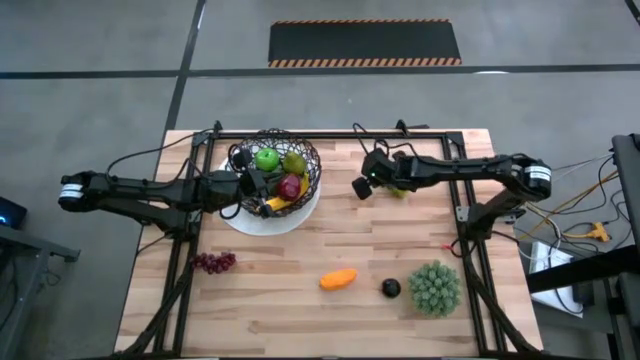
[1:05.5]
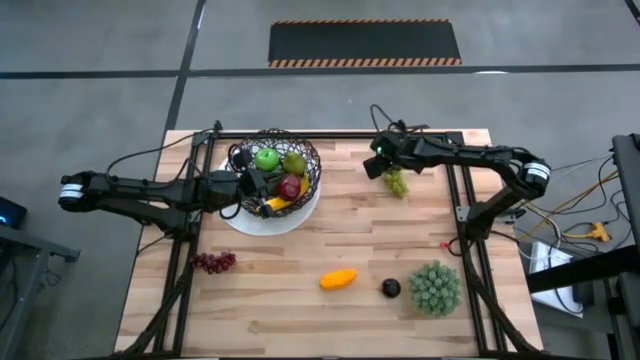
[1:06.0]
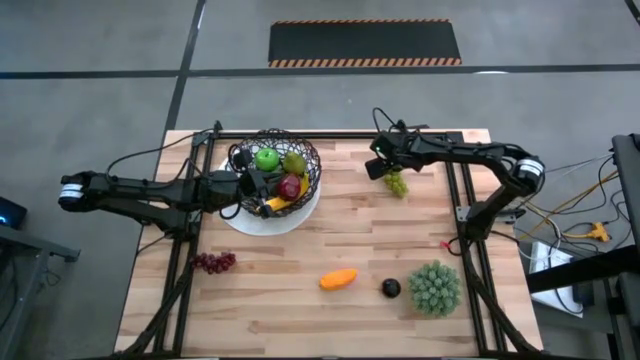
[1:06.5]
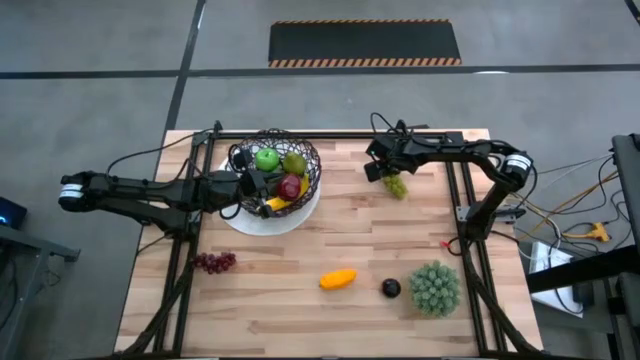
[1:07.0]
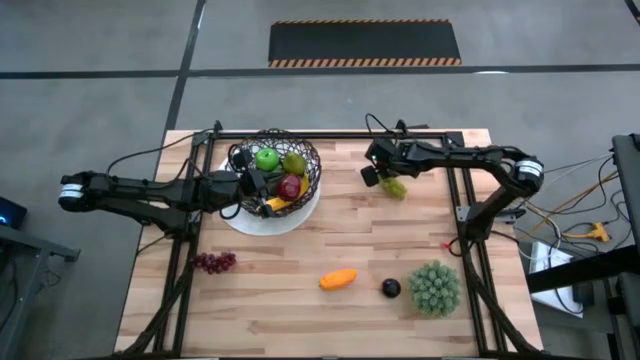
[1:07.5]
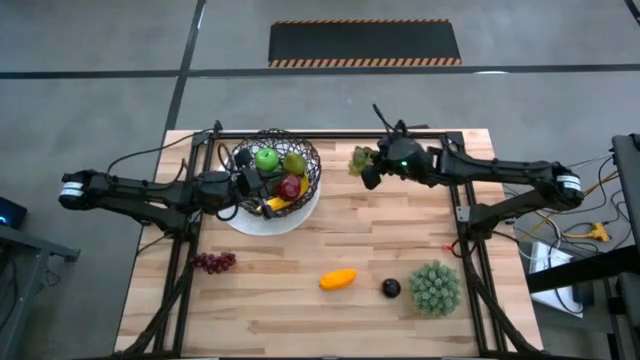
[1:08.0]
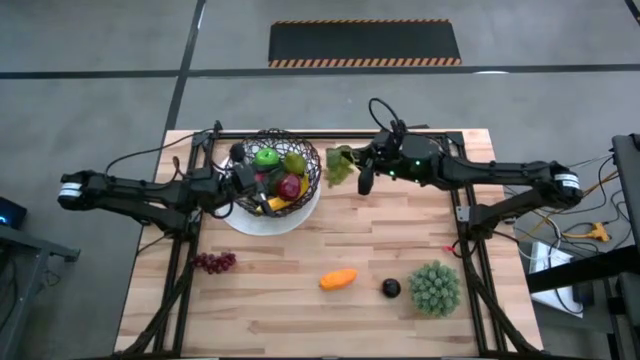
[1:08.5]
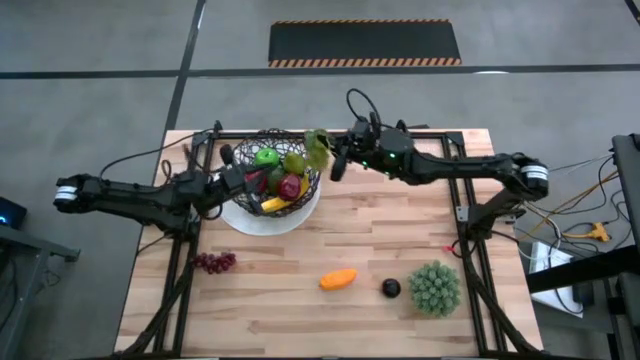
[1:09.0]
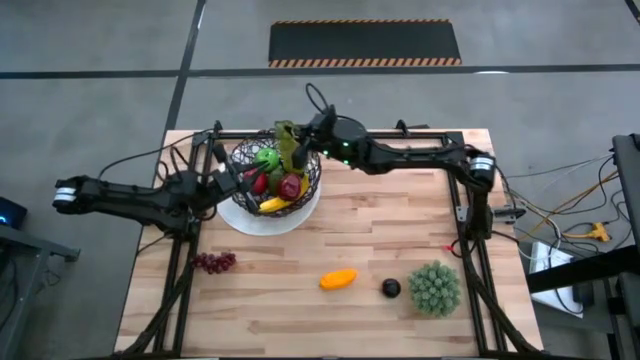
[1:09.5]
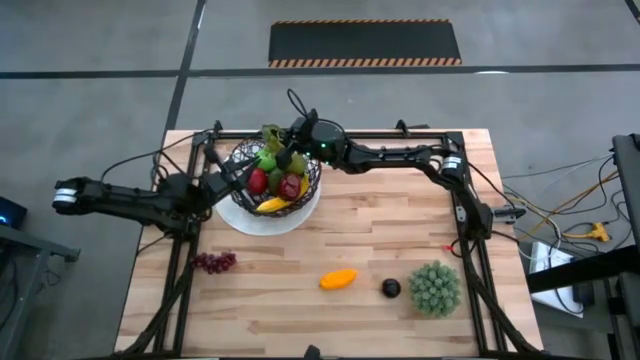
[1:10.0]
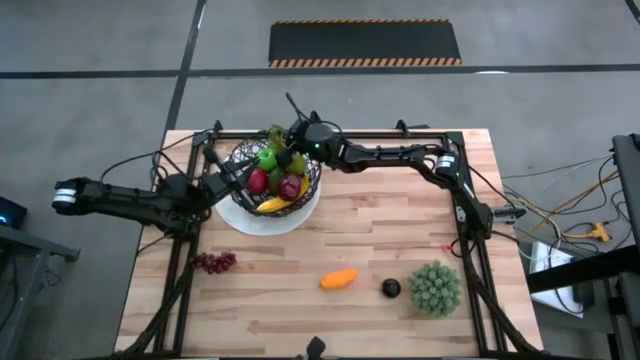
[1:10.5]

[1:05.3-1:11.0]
Task: Build produce basket
Put the green grapes into the woven basket

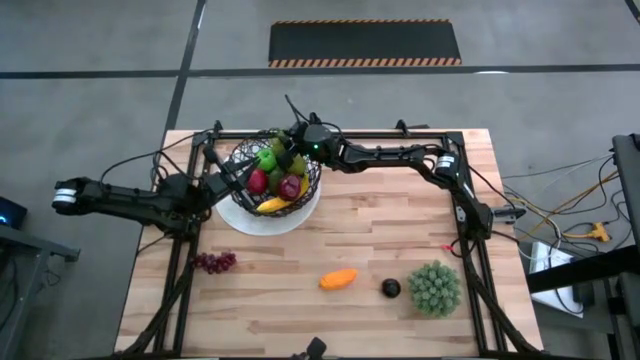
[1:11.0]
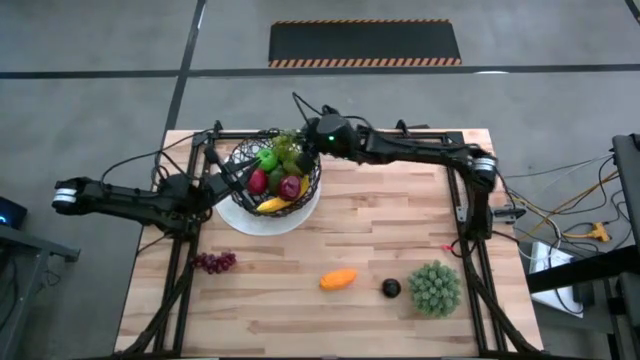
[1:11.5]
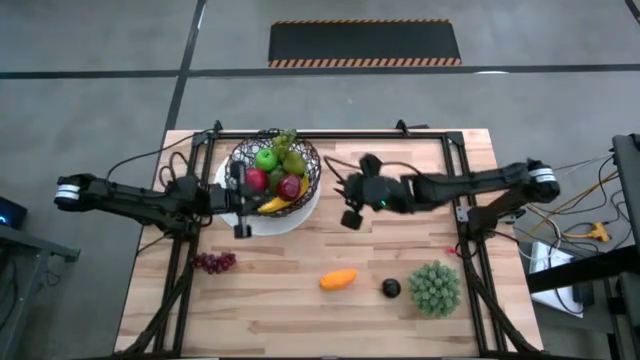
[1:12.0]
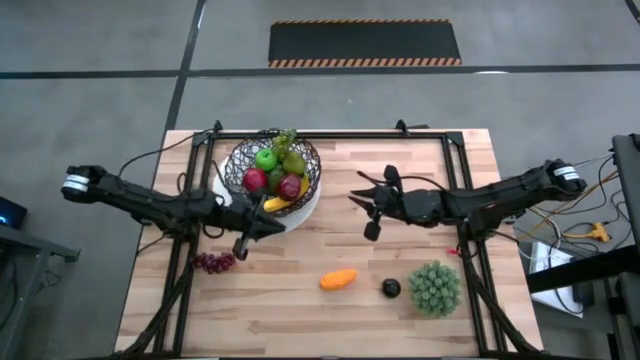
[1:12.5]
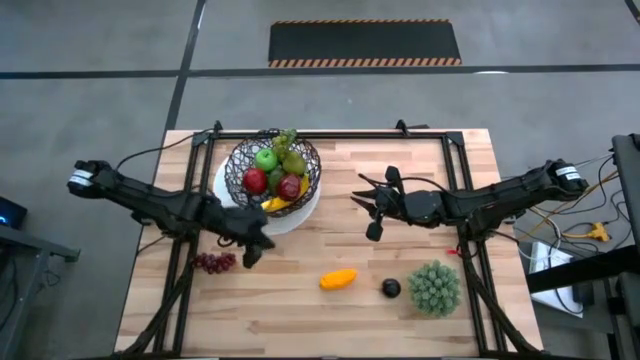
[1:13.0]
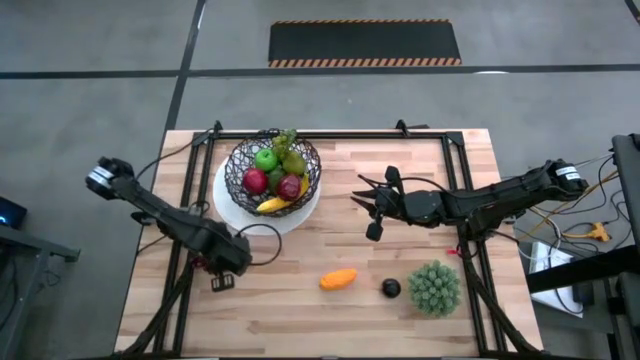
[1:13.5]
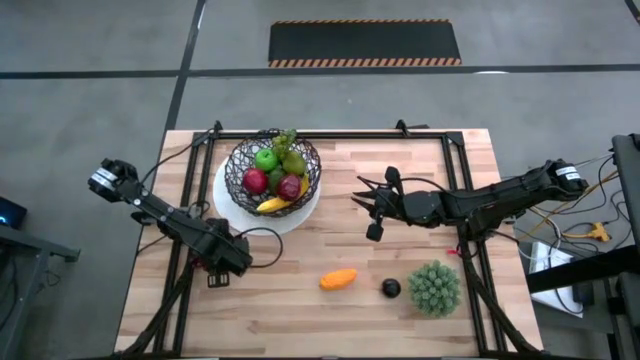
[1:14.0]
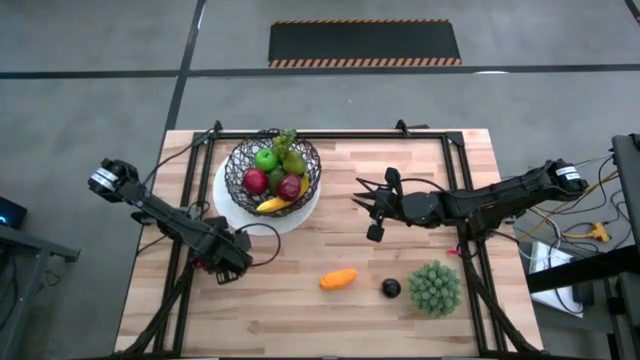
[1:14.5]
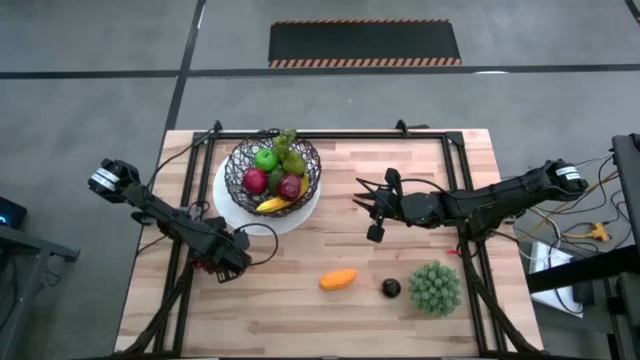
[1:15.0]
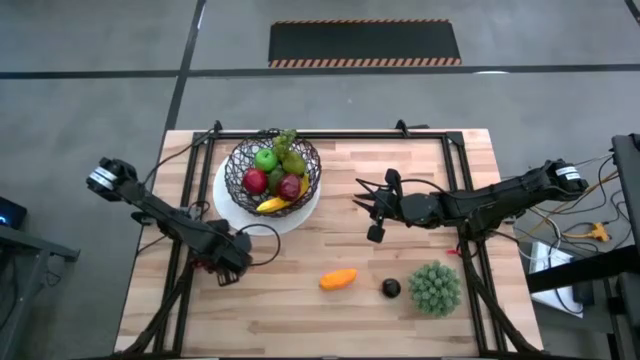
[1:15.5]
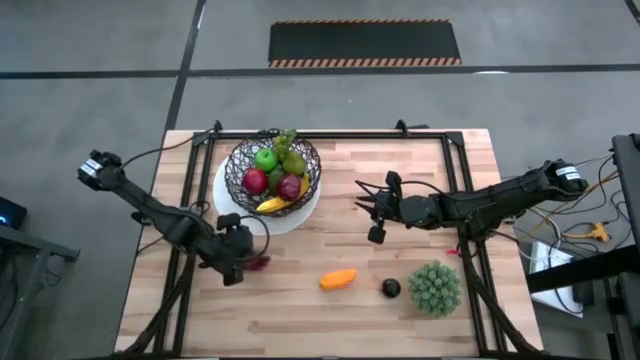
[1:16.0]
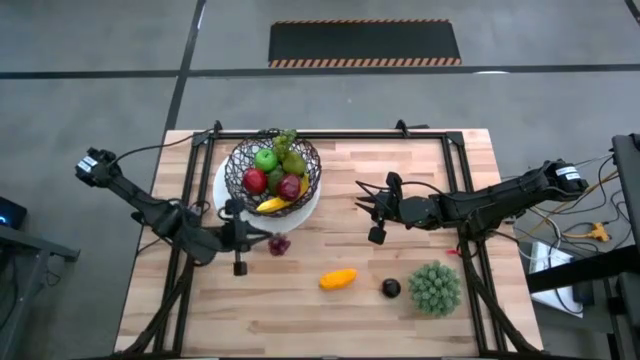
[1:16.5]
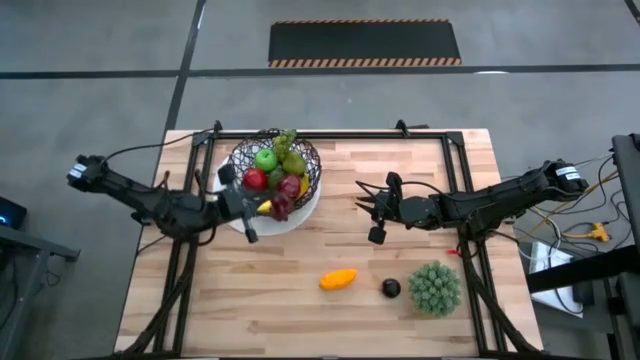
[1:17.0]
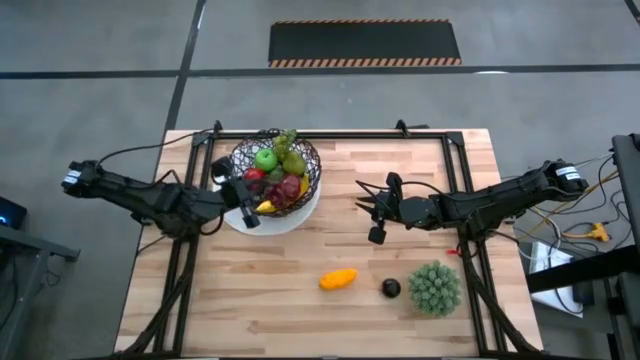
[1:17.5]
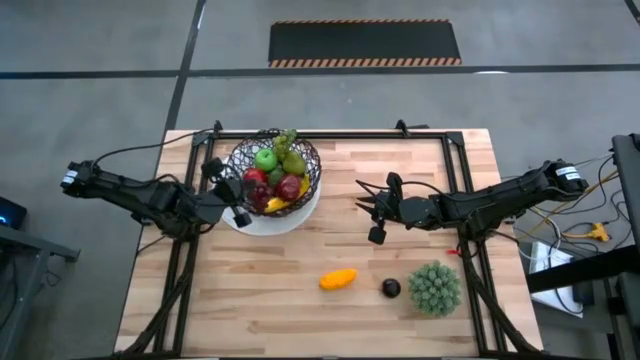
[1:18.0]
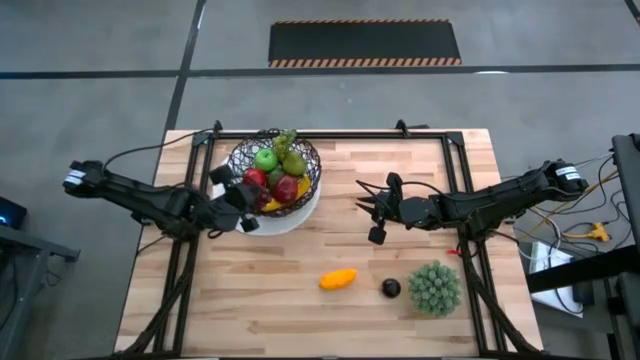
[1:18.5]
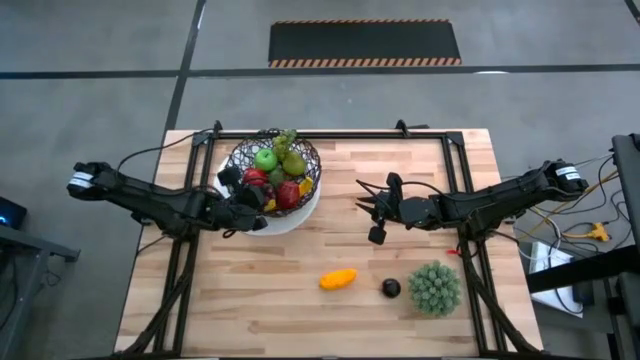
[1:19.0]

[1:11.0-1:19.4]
Put the red grapes into the woven basket

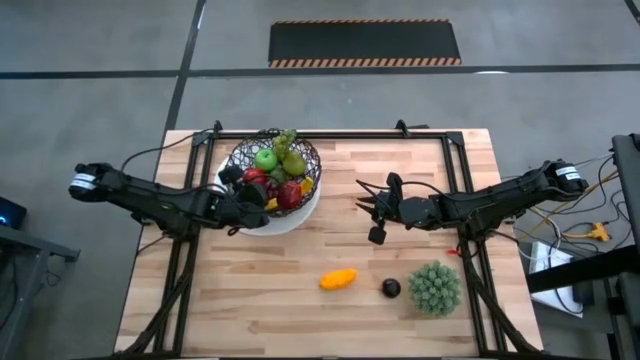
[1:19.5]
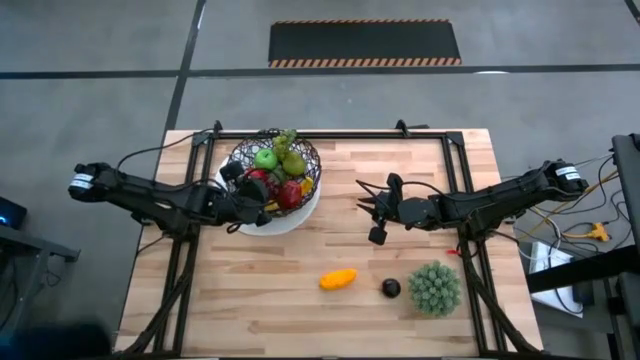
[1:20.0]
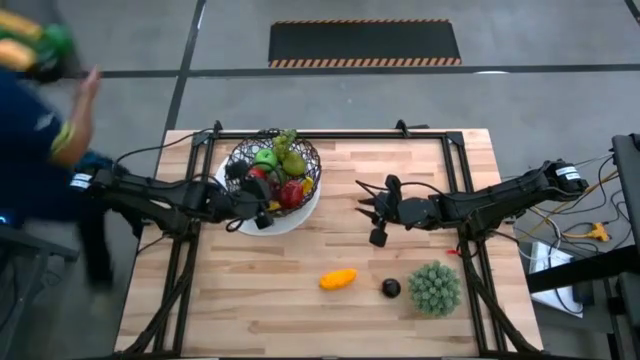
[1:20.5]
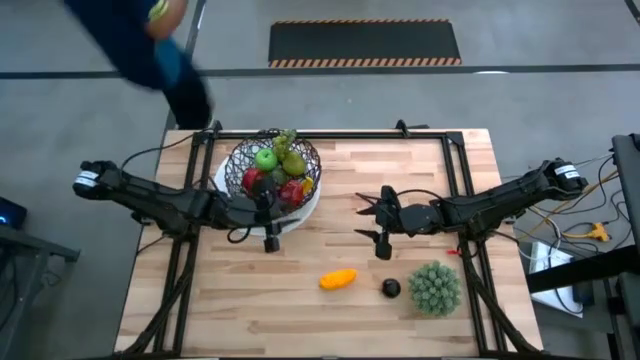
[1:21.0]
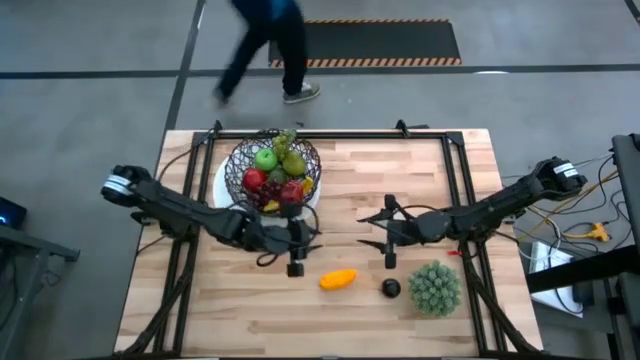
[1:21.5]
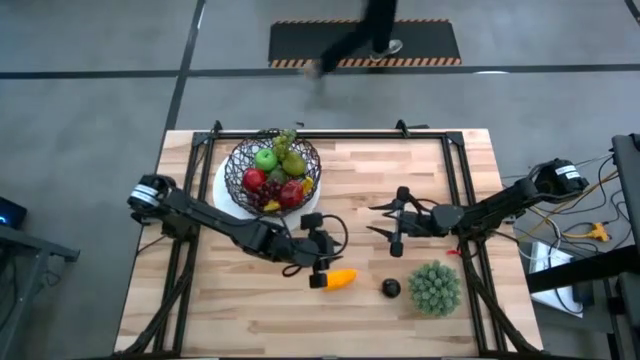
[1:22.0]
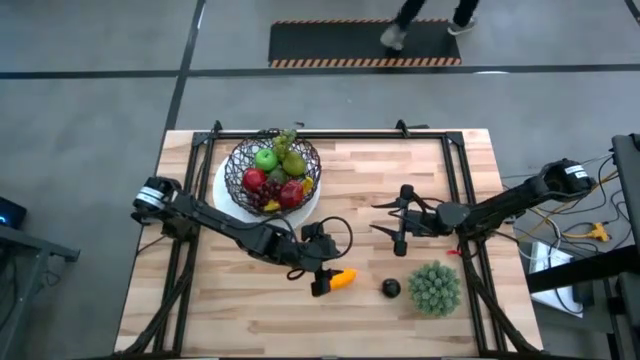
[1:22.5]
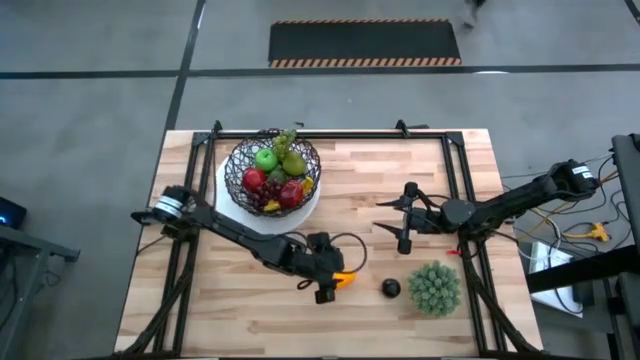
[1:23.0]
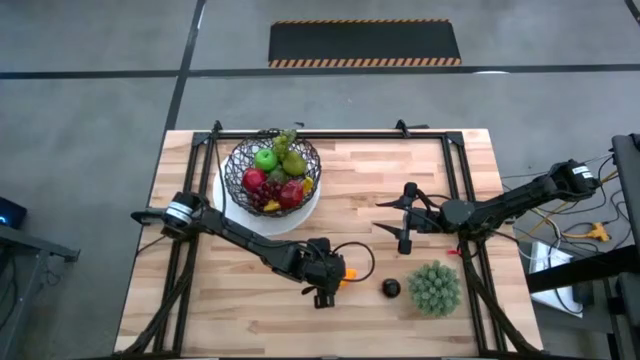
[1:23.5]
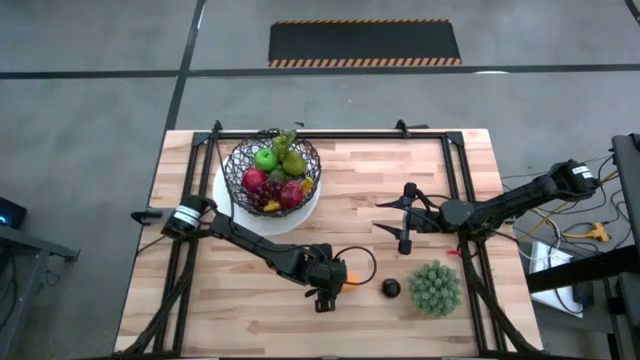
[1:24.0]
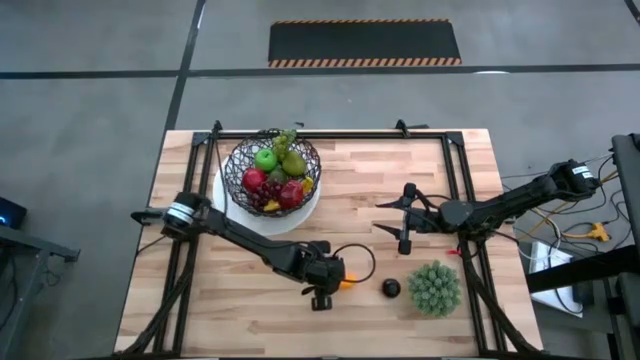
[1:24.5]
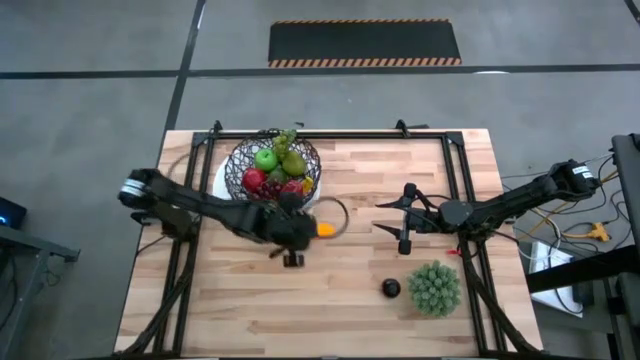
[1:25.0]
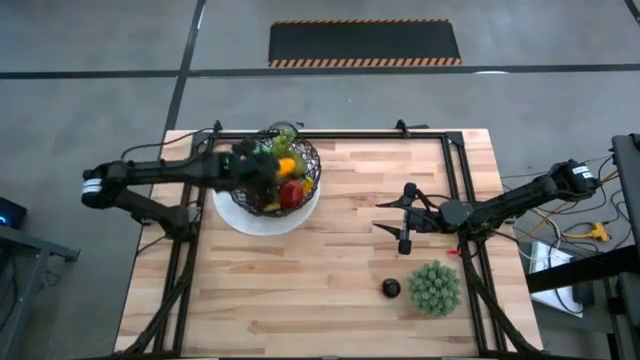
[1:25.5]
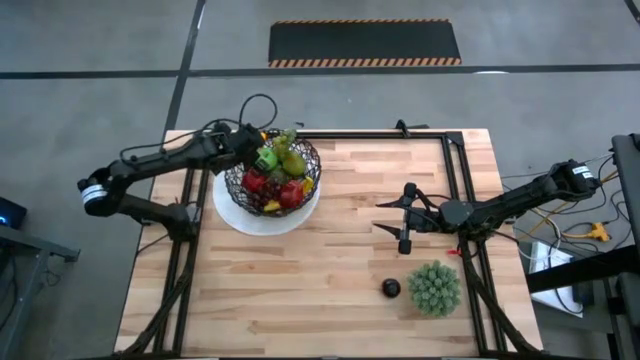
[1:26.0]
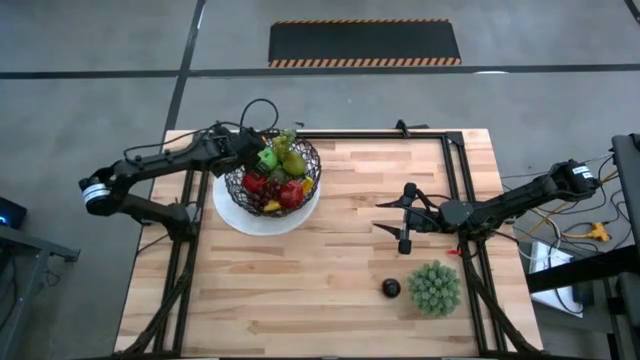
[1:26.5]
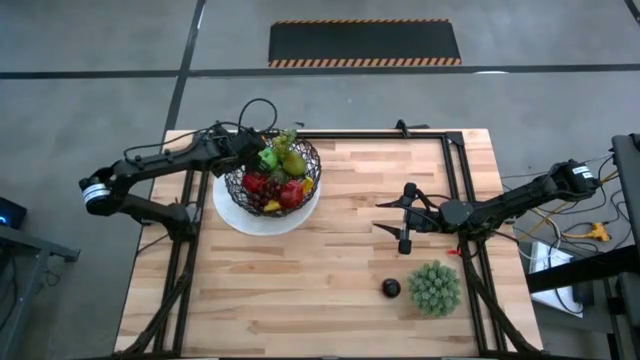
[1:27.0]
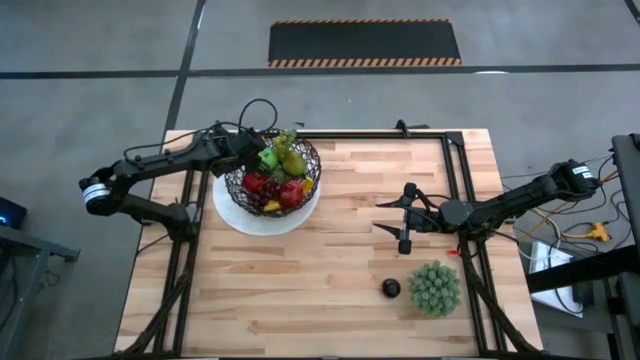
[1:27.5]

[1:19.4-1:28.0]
Put the mango into the woven basket
